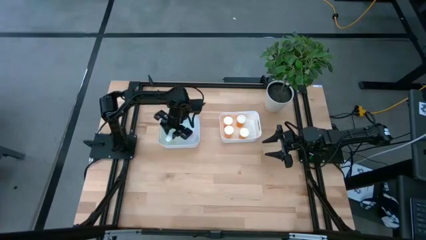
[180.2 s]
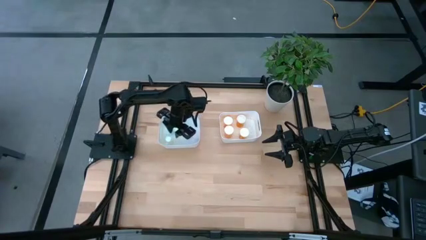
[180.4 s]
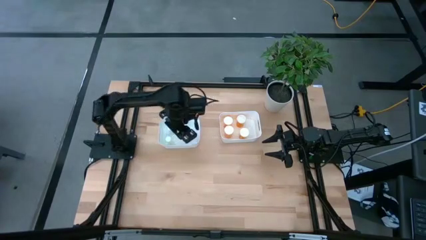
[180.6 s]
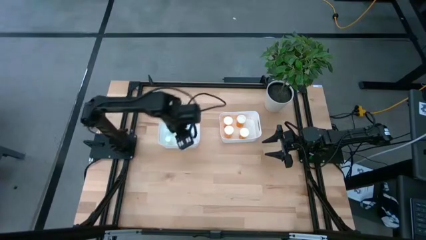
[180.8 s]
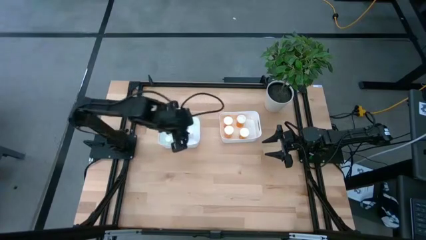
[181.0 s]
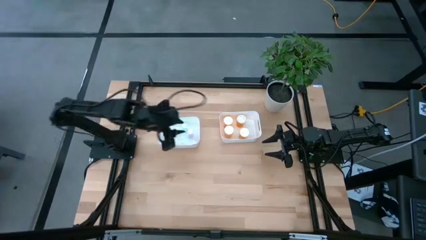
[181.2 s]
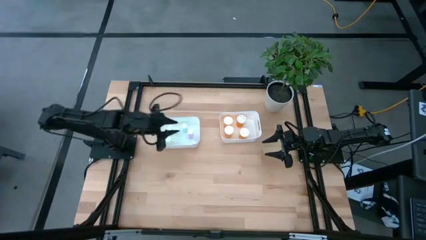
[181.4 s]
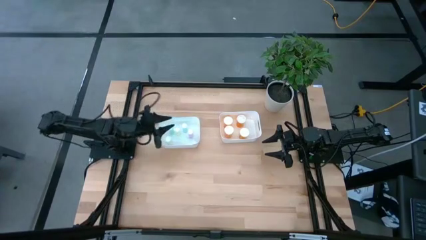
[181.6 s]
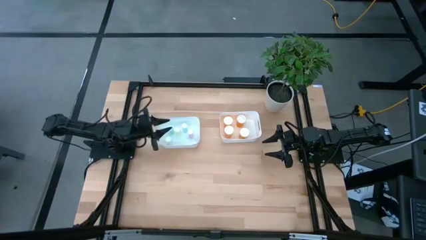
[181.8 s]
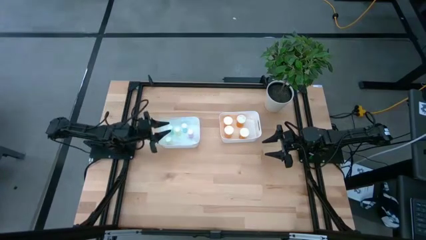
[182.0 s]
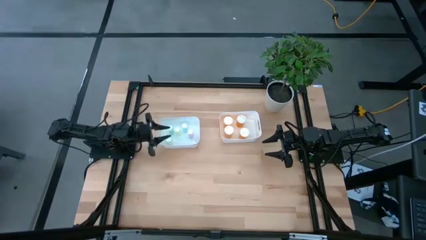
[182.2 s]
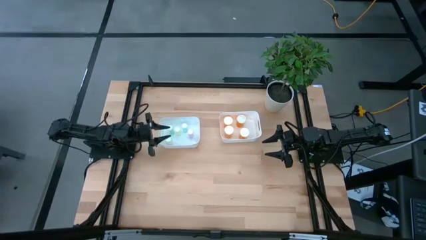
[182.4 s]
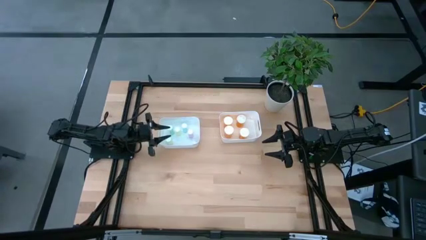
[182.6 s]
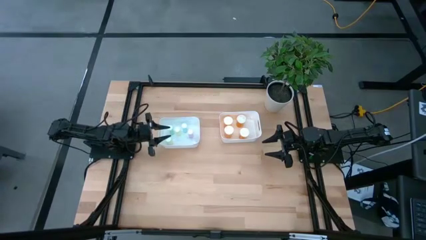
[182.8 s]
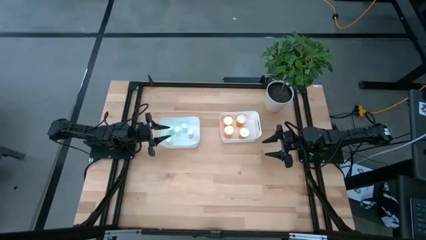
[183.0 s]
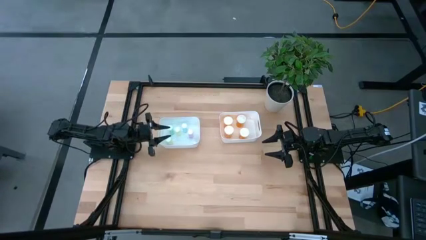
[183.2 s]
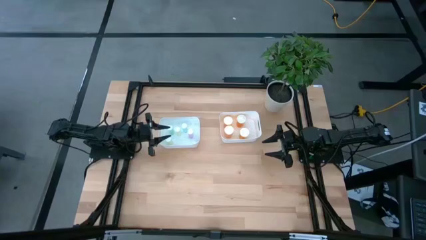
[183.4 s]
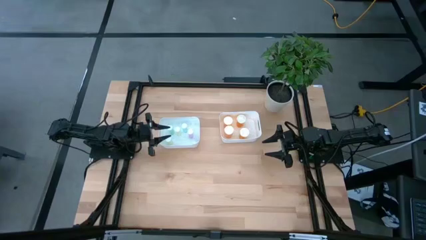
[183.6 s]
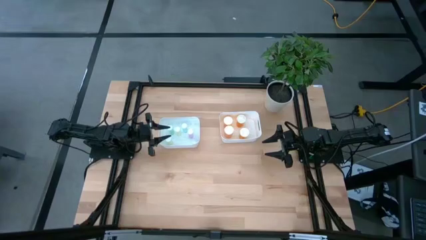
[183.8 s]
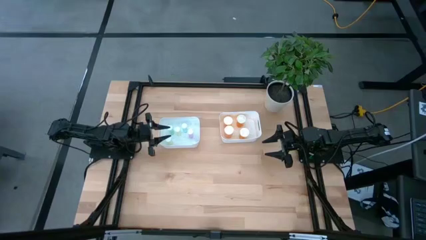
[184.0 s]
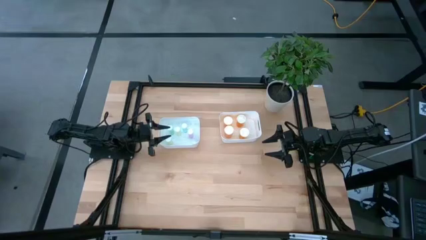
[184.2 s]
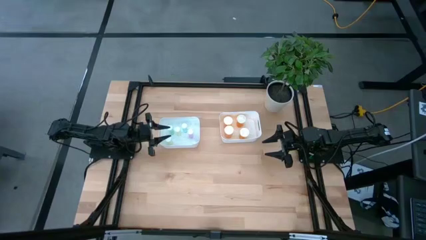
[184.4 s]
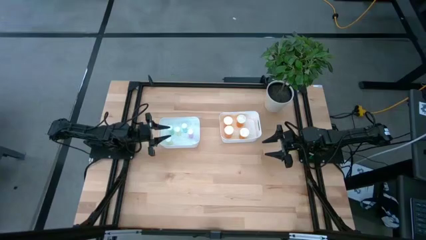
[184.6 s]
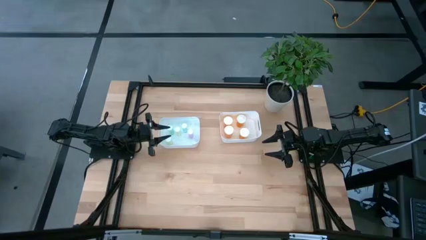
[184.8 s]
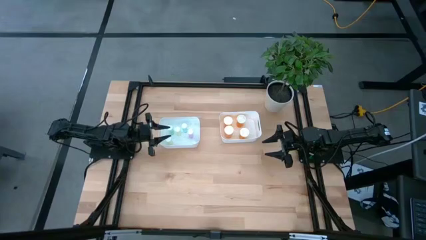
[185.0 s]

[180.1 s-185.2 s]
Task: Pick and place medicine bottles into bin by pill shape (circle, oval)
Return to Home Position

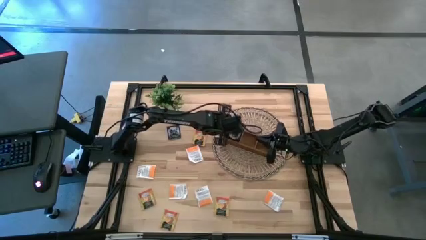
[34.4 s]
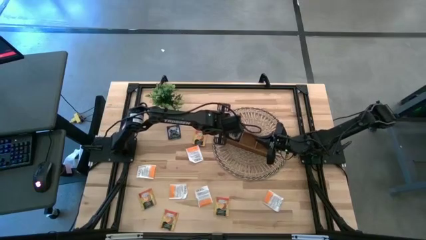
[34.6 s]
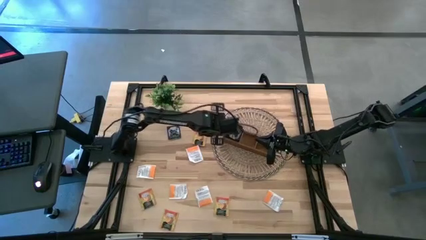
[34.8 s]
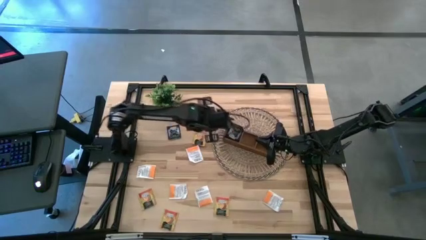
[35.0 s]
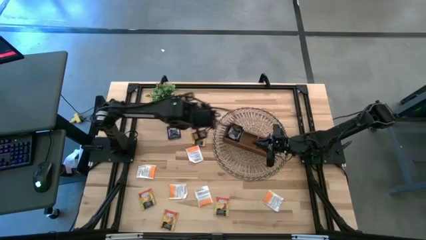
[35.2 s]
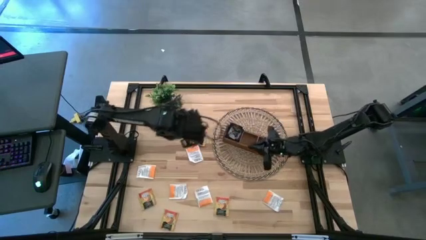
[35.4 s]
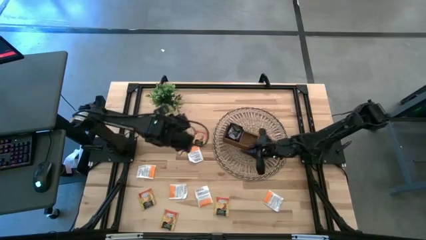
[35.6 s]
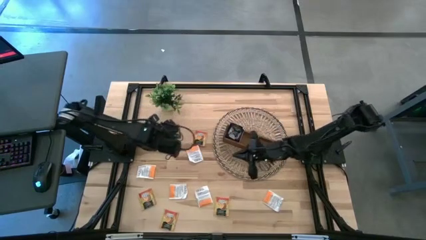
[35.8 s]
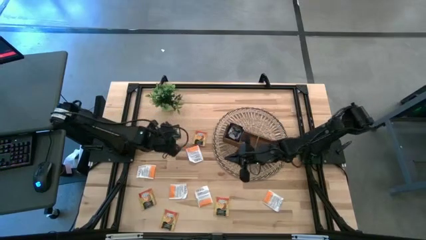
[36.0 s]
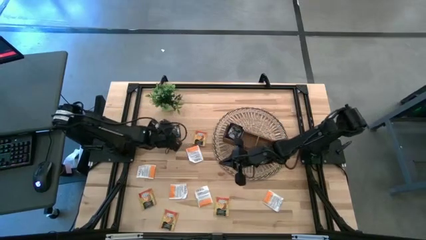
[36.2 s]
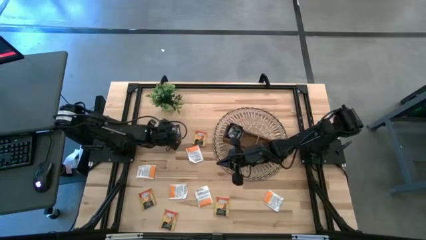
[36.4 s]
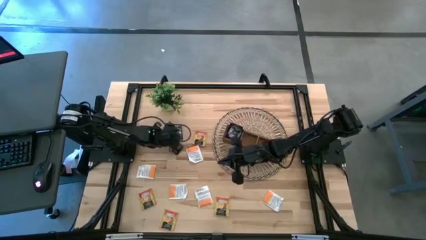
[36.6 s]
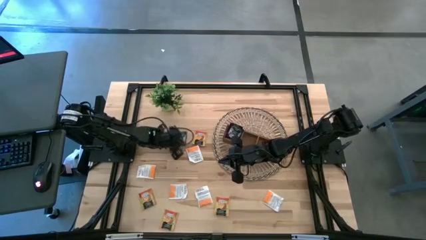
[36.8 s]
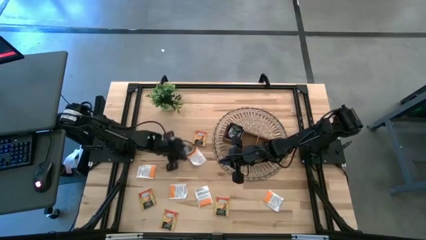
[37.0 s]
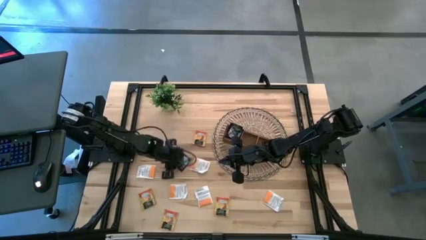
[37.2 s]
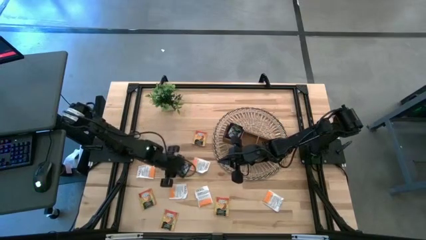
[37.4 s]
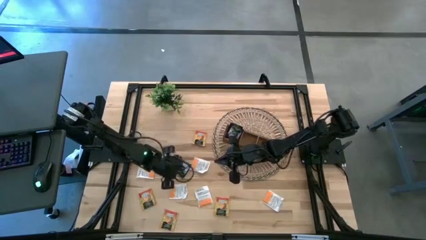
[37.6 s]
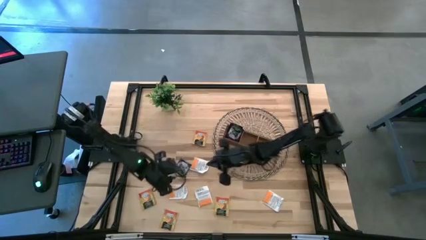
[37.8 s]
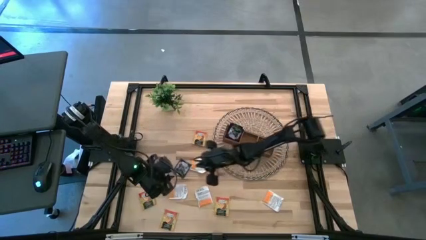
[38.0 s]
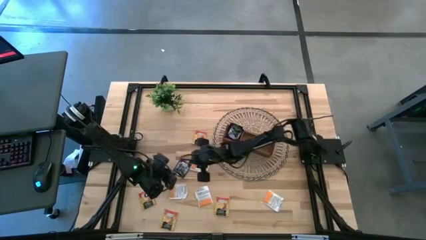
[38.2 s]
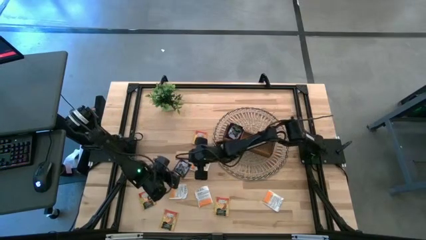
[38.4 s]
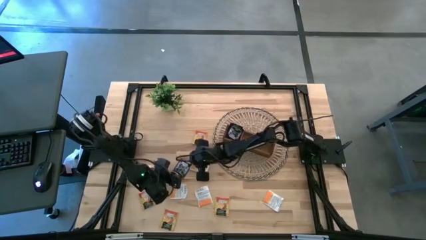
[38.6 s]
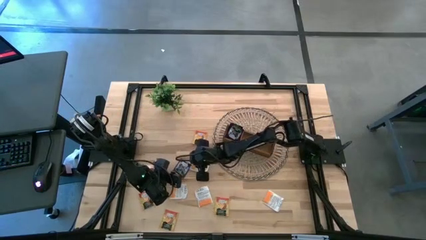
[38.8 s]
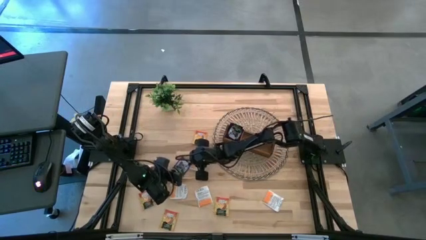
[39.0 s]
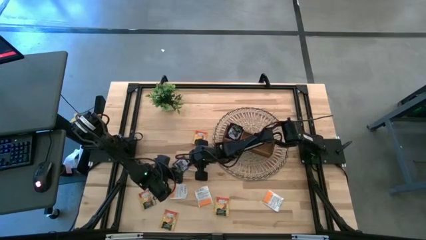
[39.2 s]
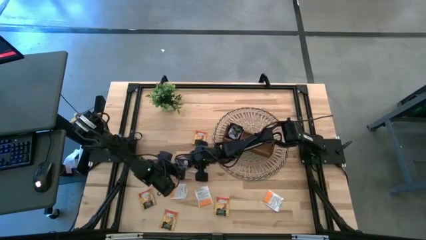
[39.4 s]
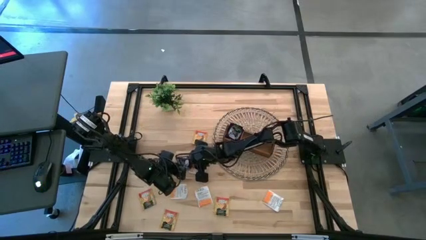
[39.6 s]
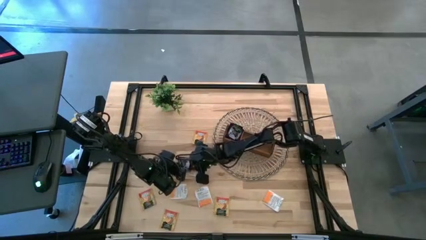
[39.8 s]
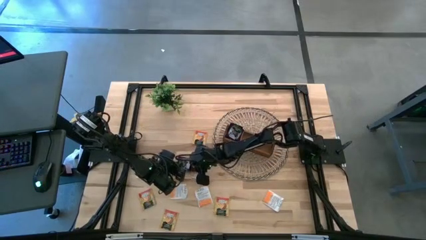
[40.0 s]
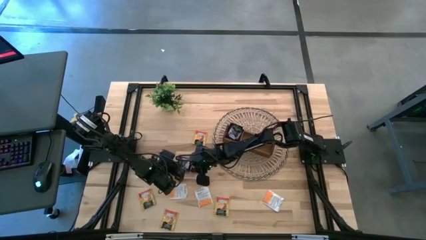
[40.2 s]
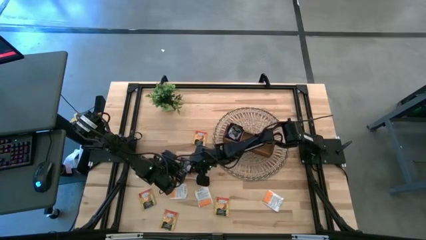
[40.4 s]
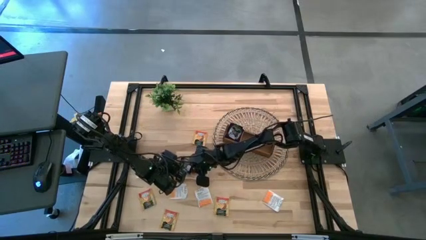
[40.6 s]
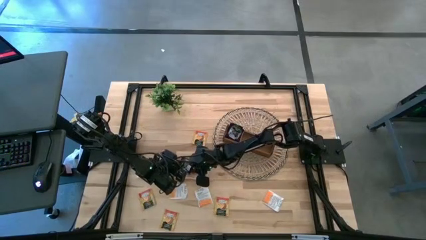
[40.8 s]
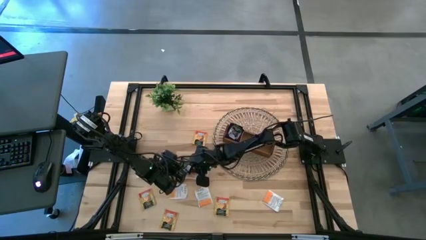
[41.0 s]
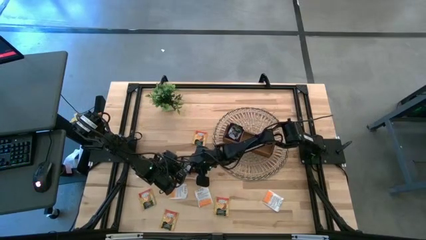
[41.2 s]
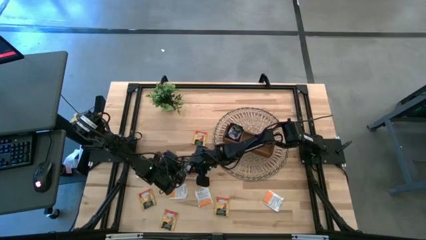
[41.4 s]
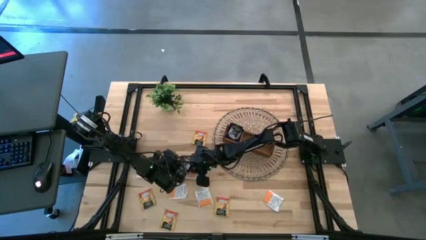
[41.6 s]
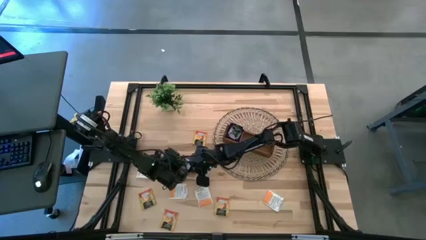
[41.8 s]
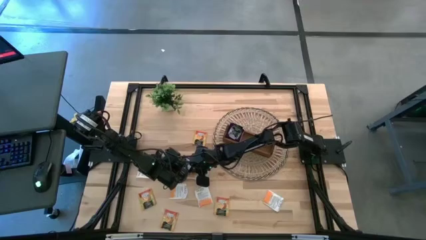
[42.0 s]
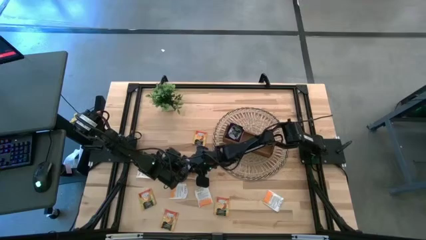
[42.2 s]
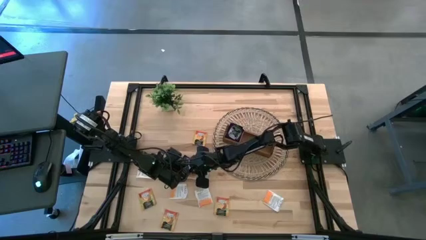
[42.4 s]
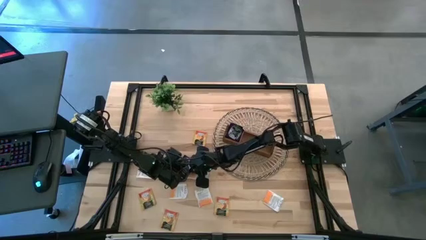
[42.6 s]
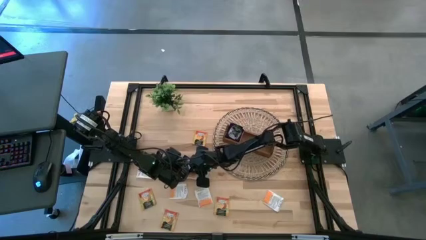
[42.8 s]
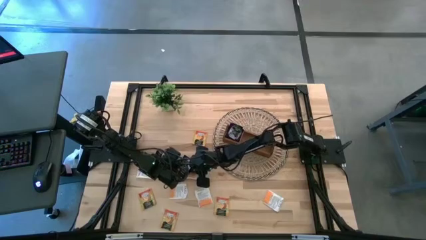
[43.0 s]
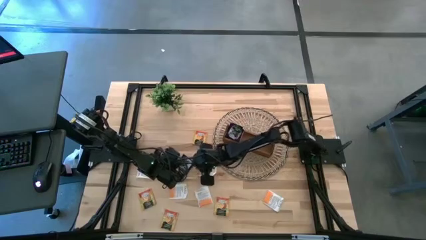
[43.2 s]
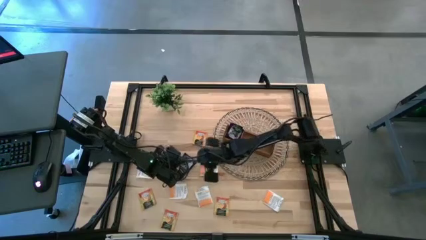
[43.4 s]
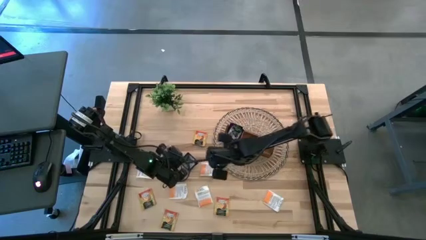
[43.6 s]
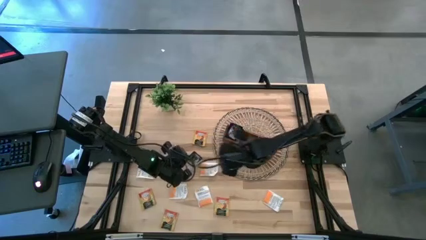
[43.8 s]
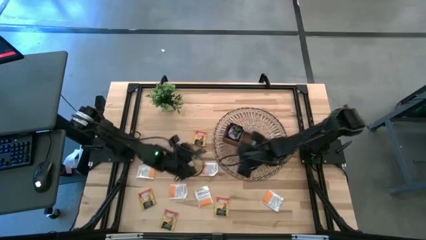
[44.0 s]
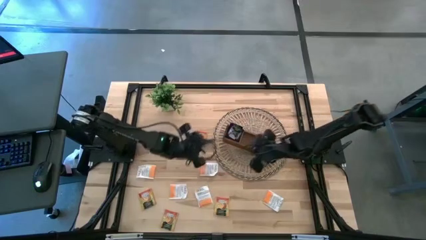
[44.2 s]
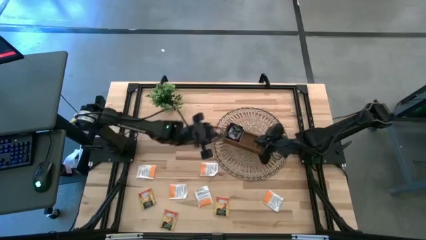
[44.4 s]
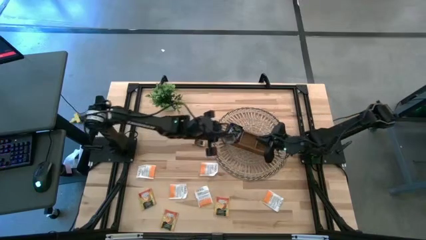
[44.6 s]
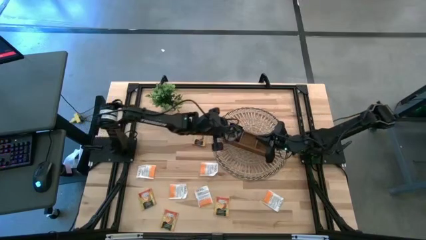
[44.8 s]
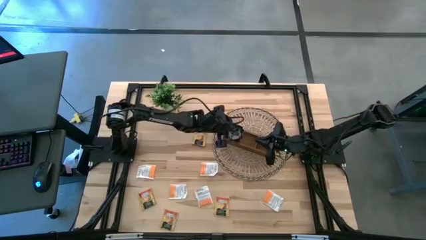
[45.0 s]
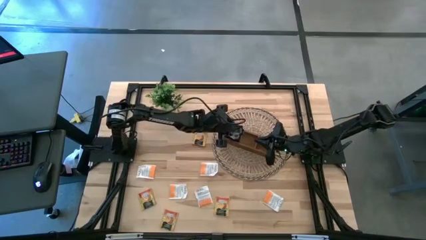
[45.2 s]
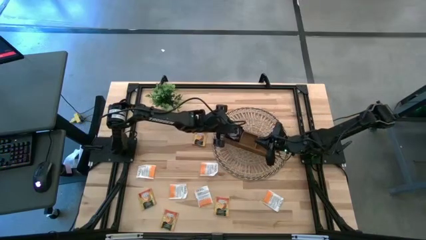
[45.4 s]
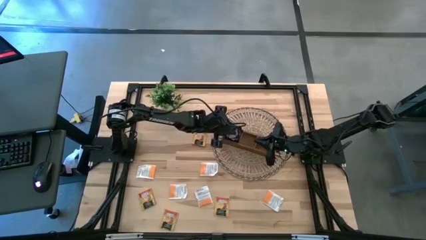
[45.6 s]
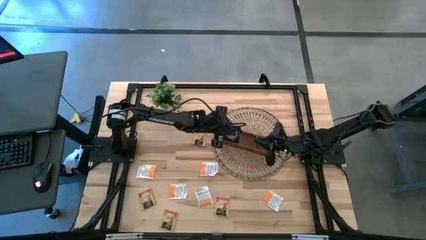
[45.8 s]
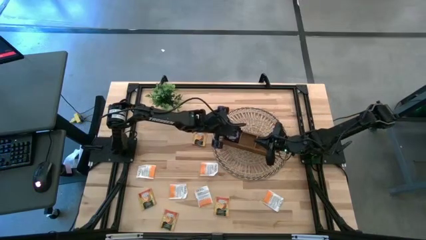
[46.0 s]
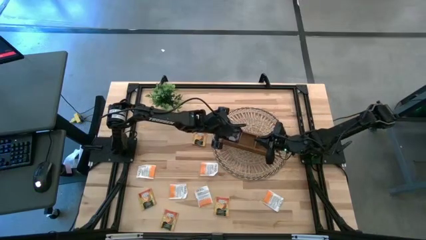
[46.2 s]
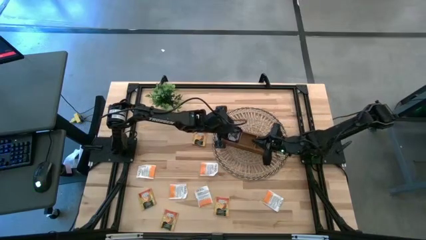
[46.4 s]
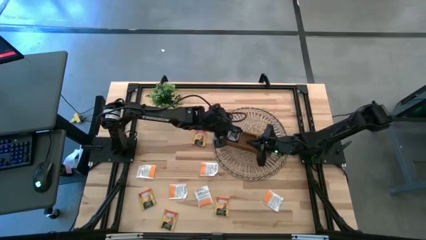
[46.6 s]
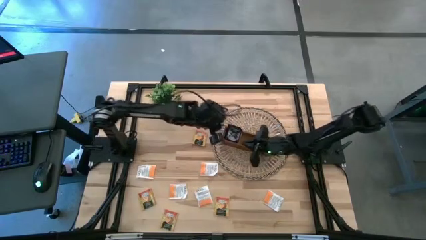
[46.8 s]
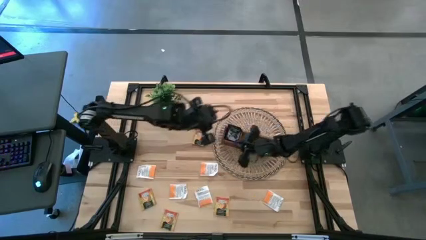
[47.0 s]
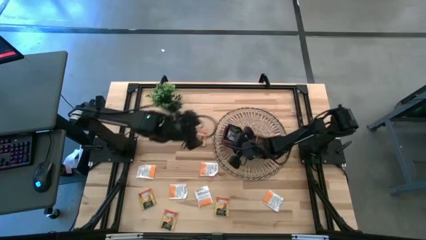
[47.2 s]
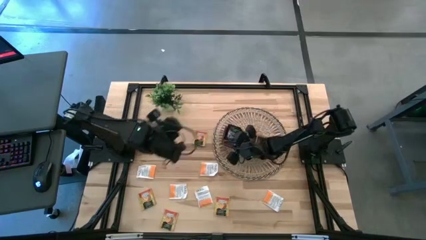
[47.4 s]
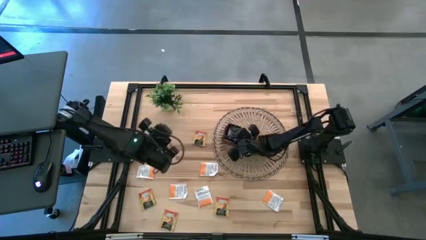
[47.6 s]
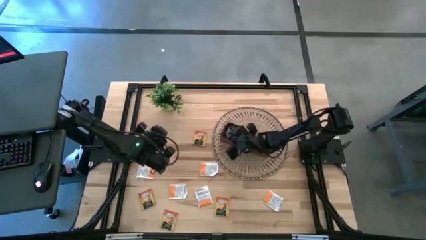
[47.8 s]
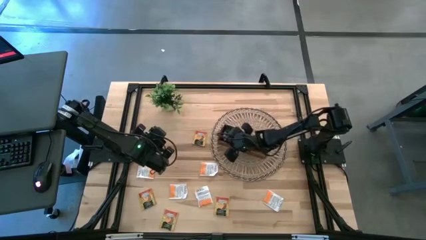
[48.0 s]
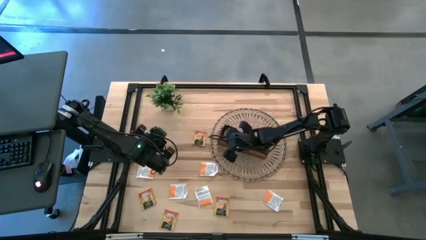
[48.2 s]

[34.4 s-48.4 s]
Task: Pick & Place Tea
Put the violet tea bag into the left section of the wooden organizer
